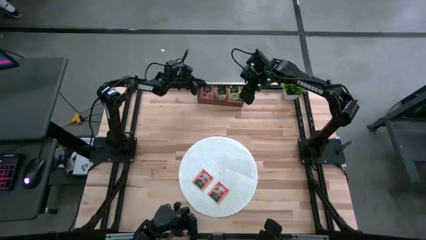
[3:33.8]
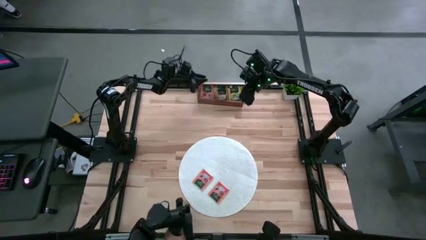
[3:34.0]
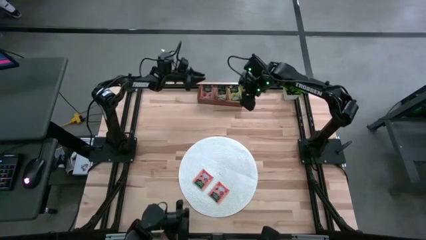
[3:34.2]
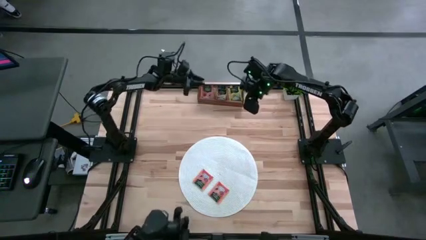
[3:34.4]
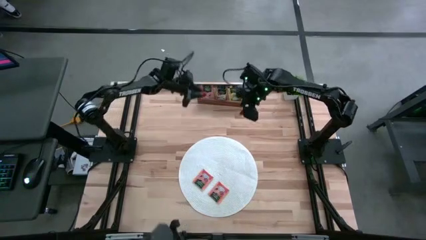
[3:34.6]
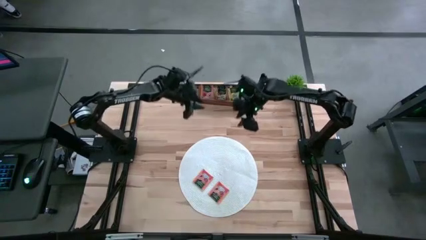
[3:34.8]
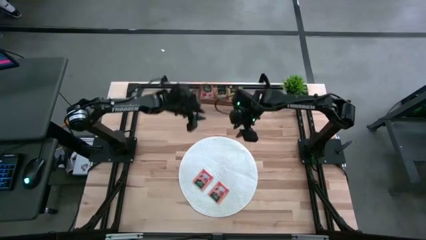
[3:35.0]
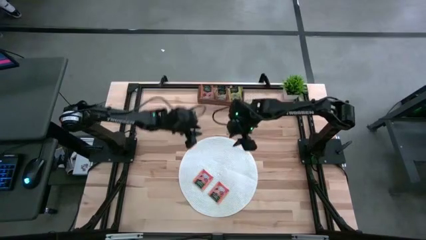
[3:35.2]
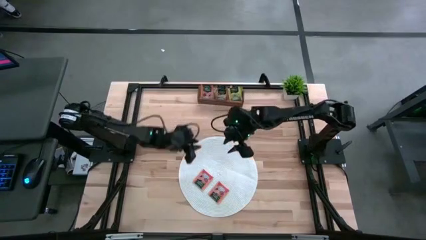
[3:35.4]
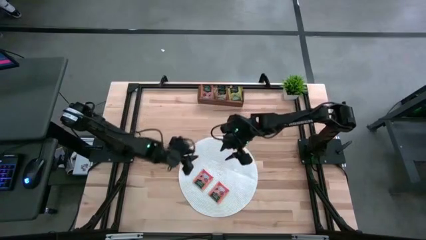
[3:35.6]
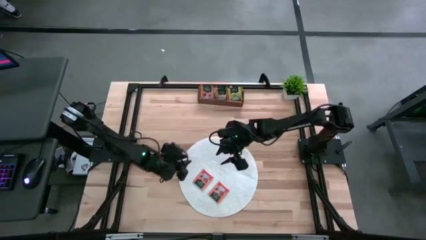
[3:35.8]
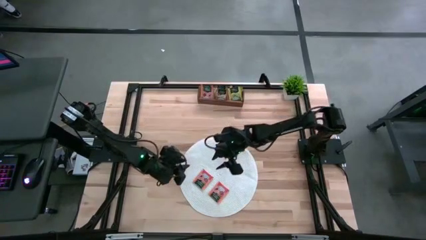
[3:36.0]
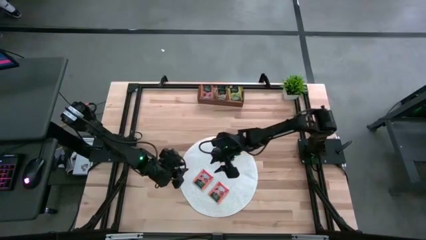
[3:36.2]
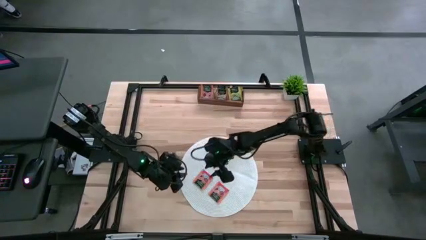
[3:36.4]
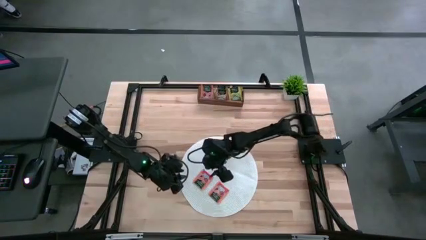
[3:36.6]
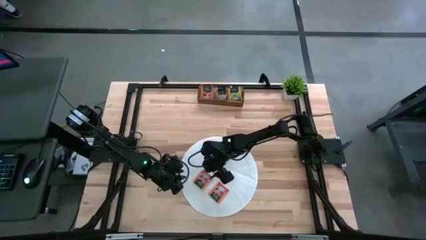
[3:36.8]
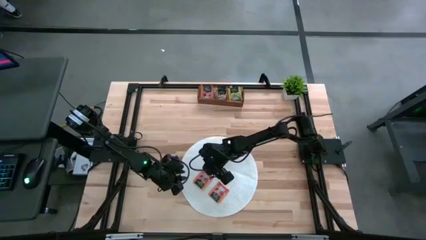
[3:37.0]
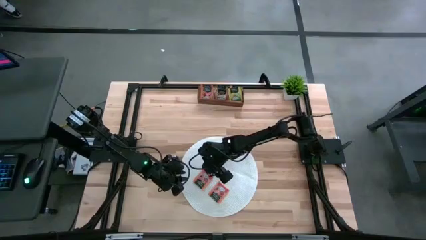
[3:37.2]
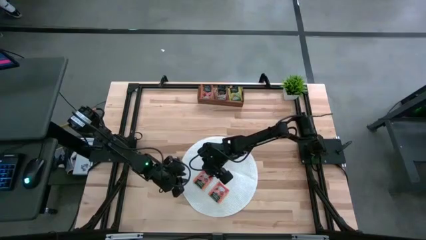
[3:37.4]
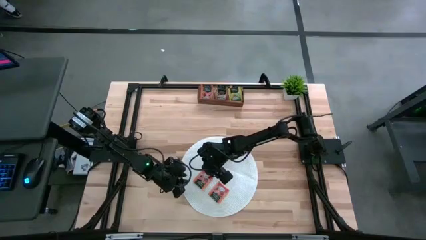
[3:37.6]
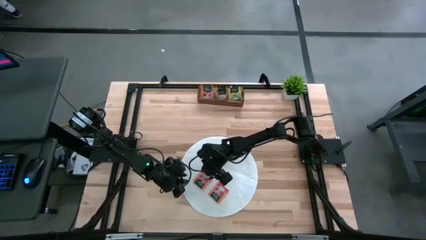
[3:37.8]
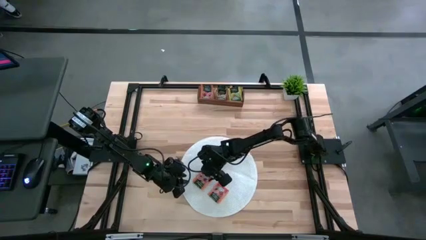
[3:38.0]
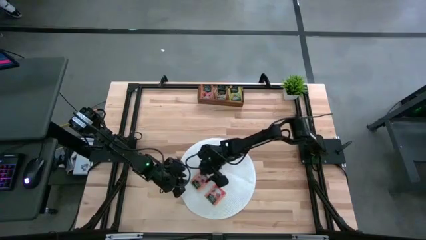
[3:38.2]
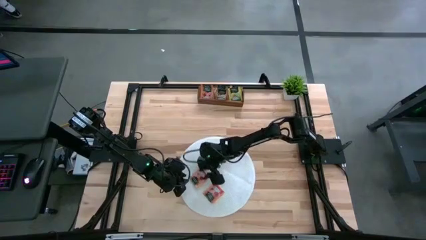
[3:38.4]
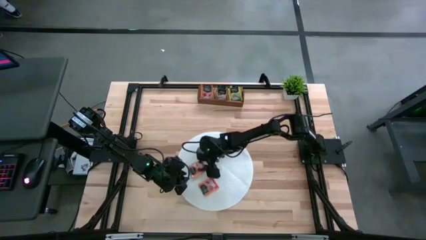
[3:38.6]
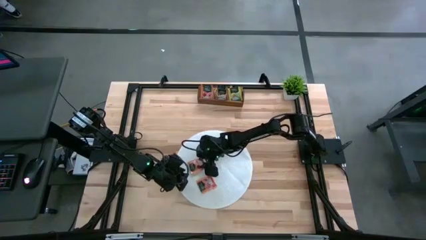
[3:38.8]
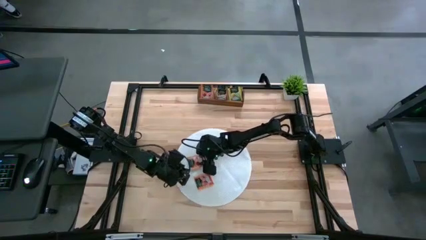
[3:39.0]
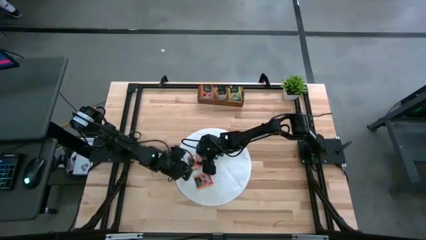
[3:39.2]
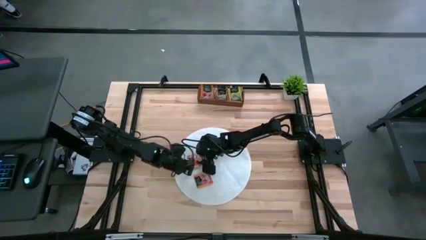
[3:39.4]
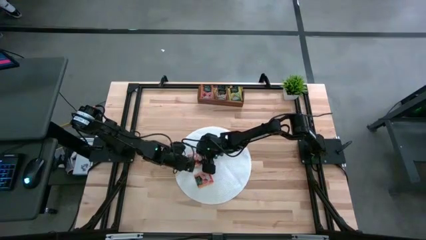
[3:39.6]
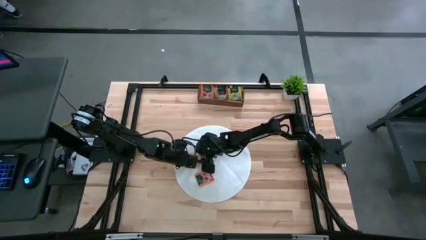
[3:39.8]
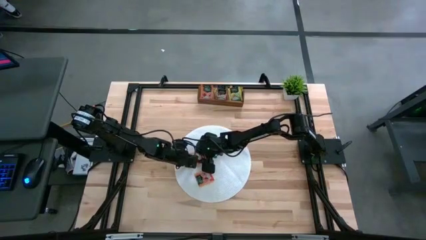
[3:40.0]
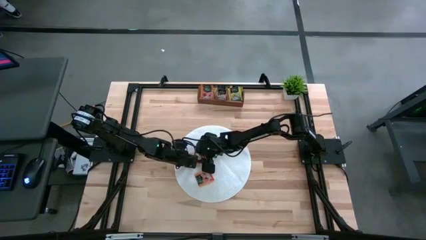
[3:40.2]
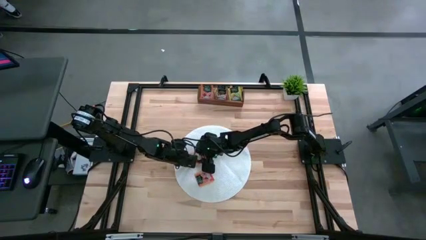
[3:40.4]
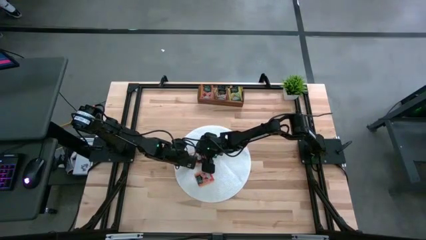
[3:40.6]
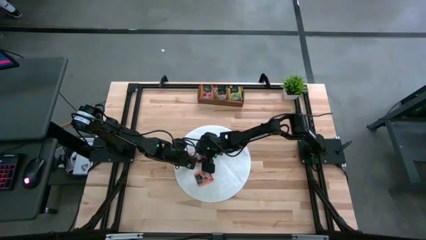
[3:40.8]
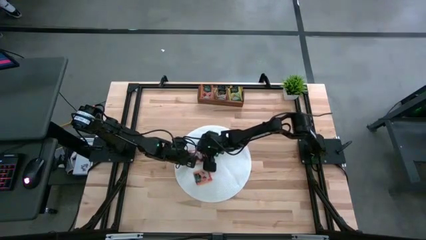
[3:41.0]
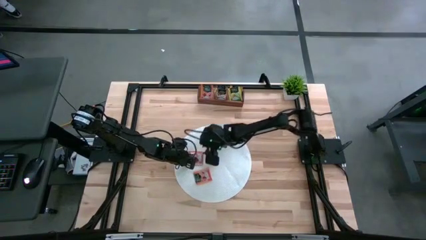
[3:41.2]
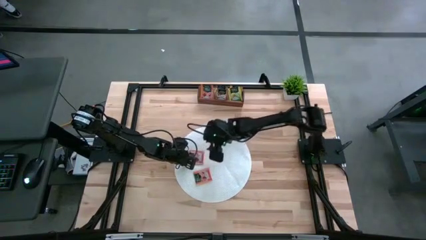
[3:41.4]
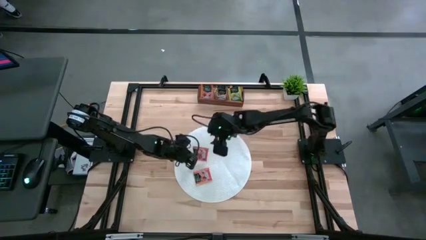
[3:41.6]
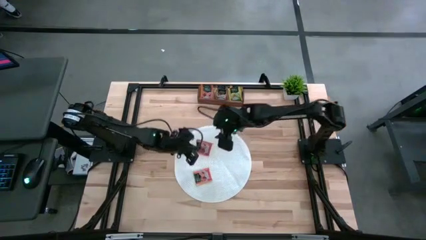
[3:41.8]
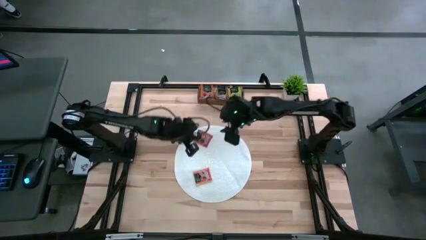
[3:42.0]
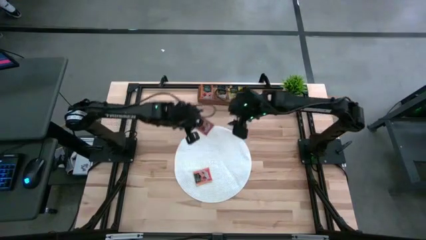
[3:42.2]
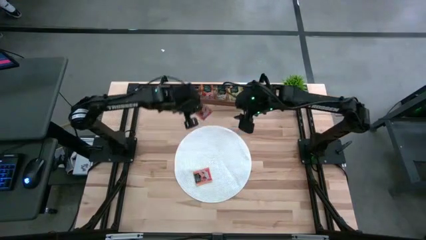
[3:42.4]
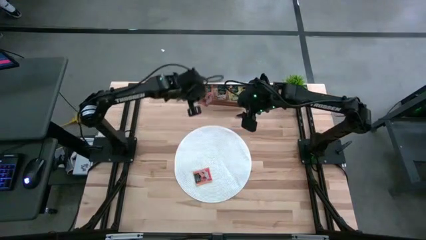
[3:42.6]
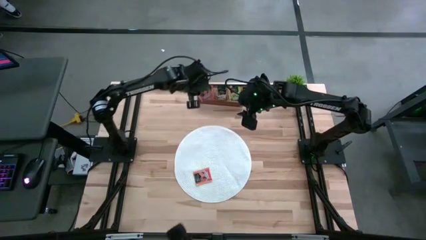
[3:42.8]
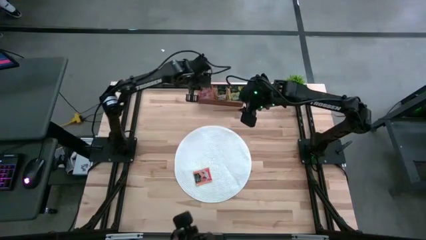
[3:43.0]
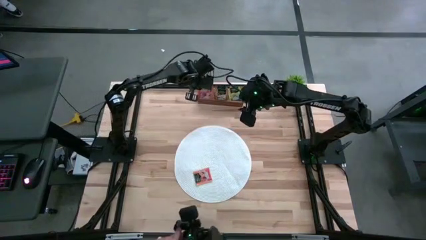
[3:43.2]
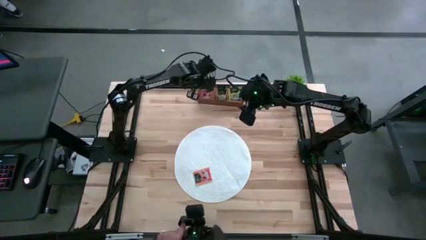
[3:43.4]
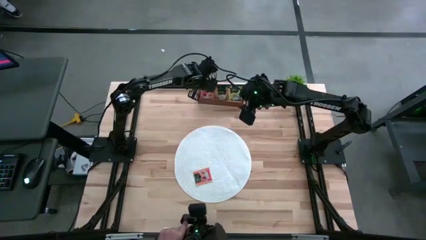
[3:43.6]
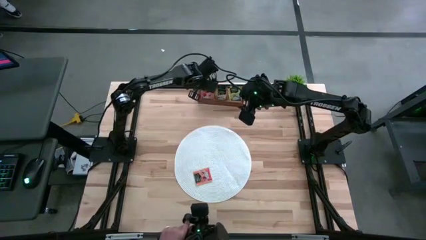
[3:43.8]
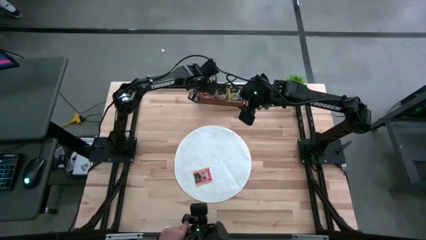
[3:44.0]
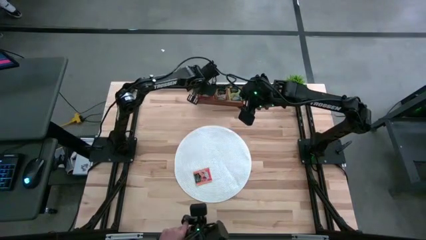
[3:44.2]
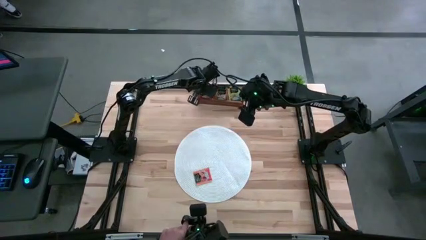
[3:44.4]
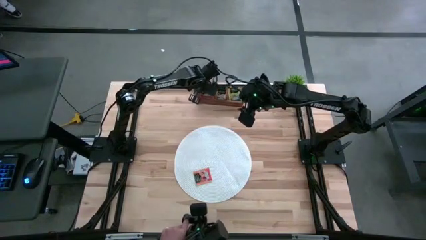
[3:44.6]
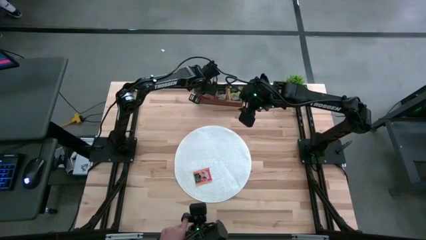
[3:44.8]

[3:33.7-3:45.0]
Task: Pick & Place Tea
Put the orange tea bag into the left section of the wooden organizer
